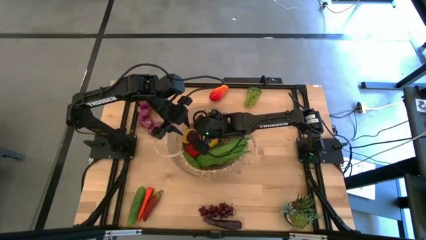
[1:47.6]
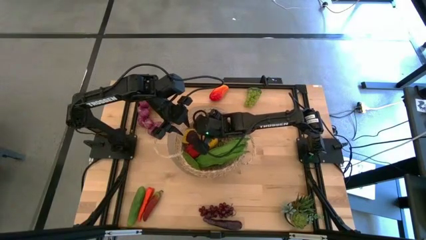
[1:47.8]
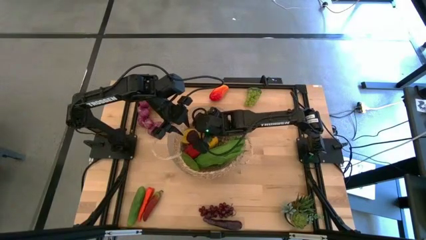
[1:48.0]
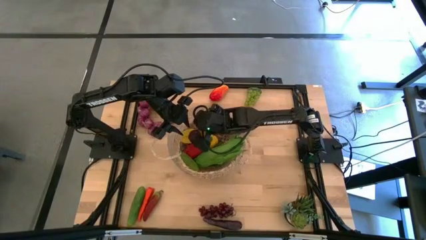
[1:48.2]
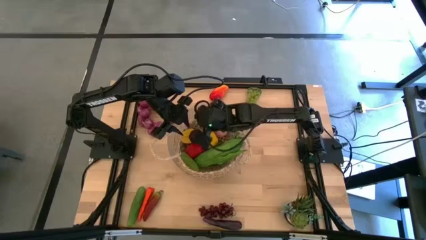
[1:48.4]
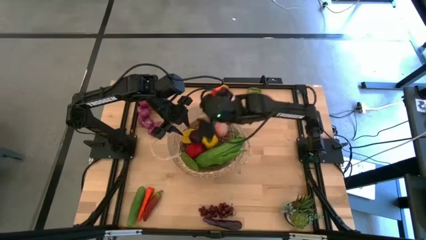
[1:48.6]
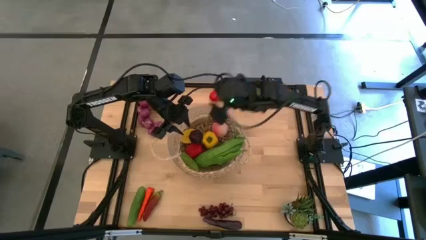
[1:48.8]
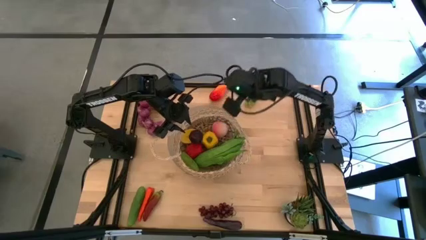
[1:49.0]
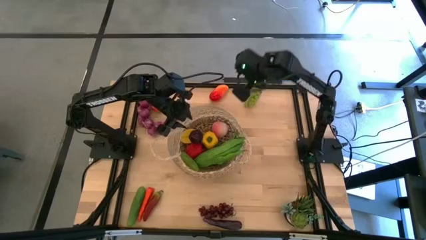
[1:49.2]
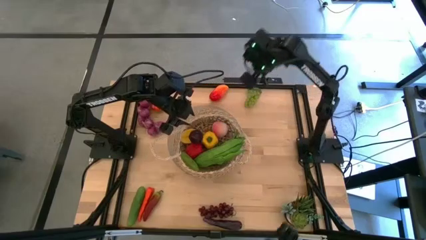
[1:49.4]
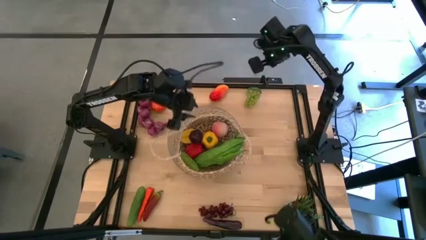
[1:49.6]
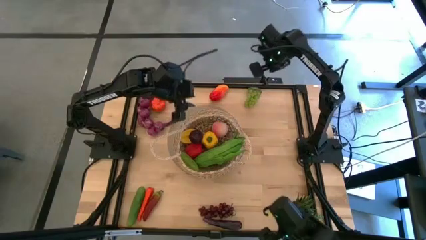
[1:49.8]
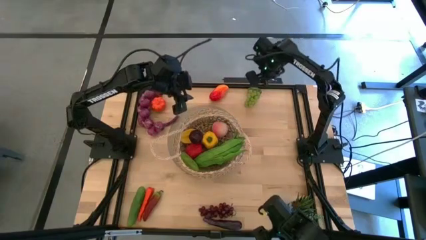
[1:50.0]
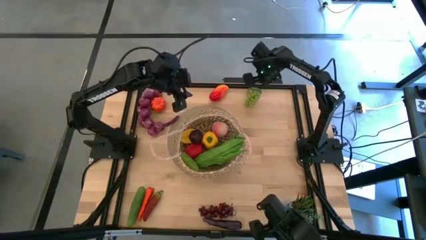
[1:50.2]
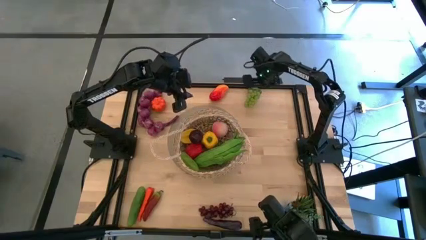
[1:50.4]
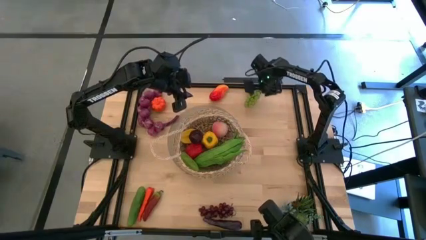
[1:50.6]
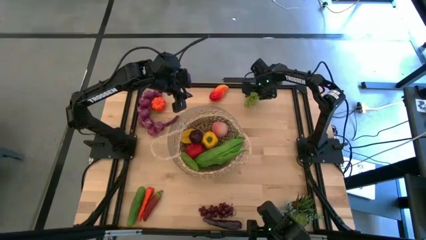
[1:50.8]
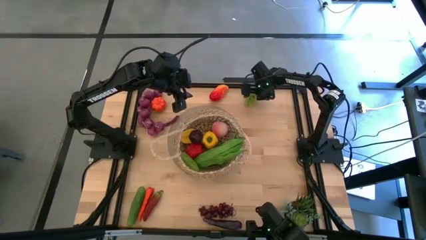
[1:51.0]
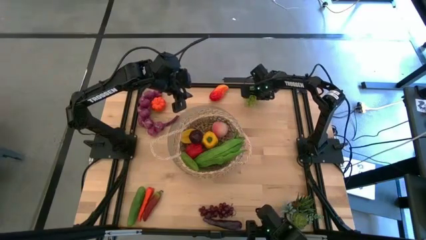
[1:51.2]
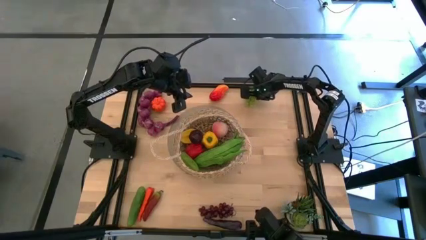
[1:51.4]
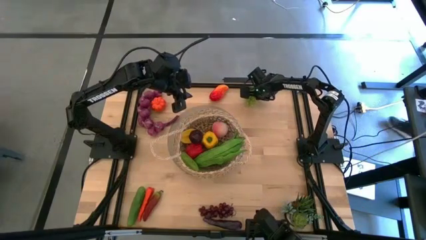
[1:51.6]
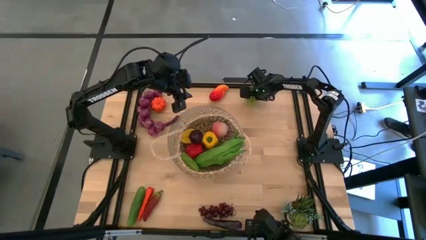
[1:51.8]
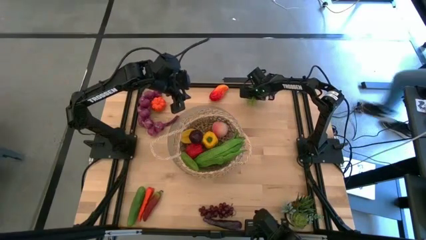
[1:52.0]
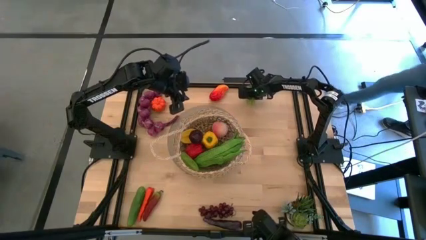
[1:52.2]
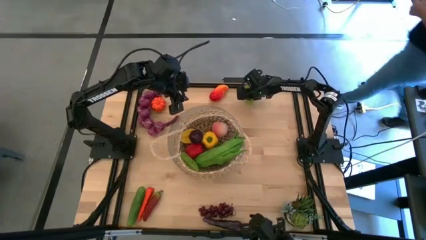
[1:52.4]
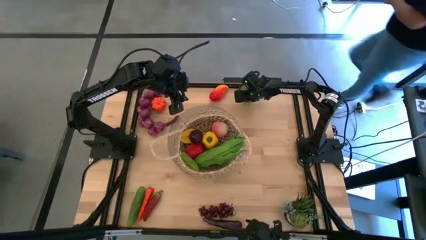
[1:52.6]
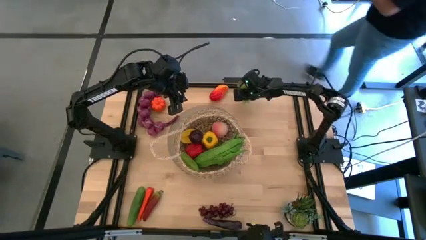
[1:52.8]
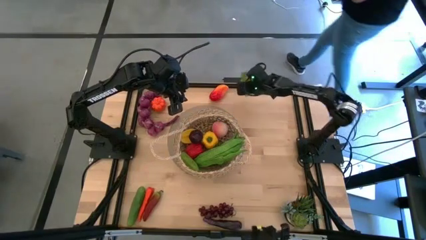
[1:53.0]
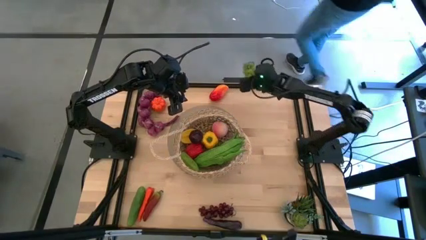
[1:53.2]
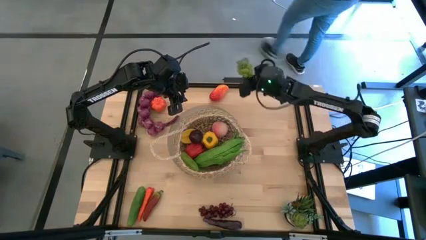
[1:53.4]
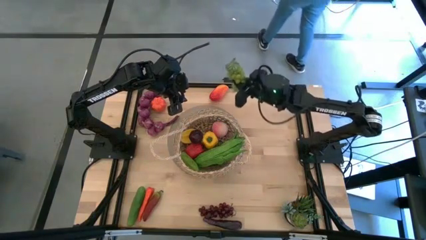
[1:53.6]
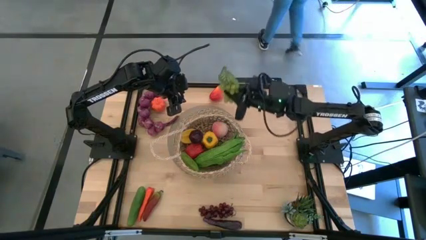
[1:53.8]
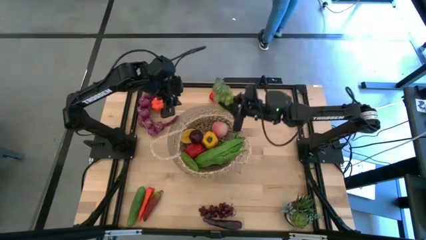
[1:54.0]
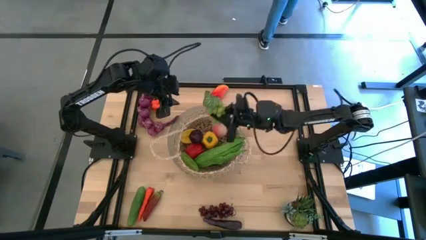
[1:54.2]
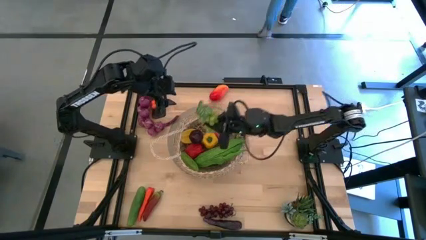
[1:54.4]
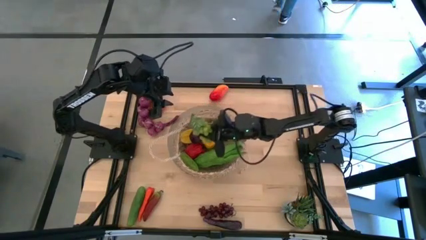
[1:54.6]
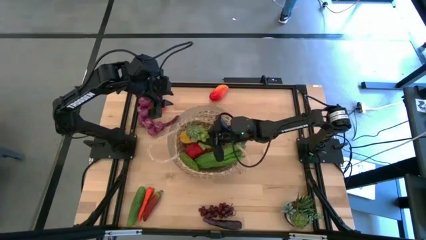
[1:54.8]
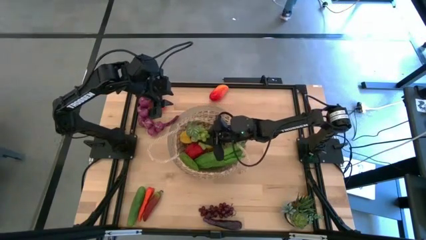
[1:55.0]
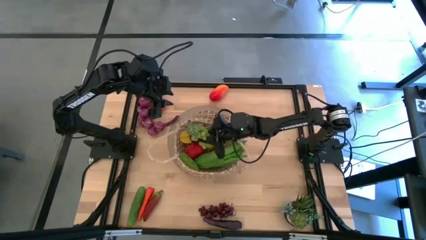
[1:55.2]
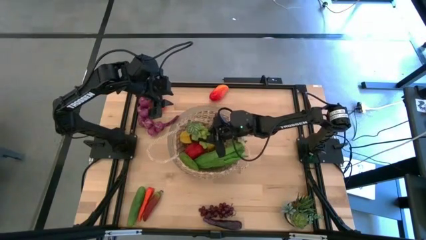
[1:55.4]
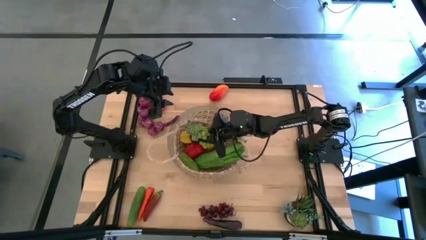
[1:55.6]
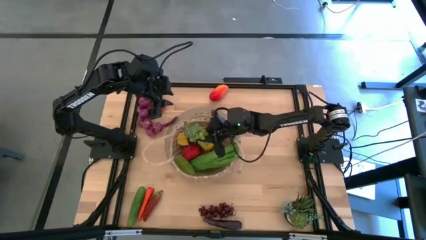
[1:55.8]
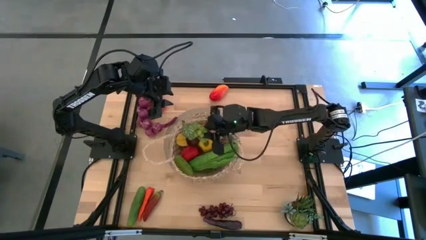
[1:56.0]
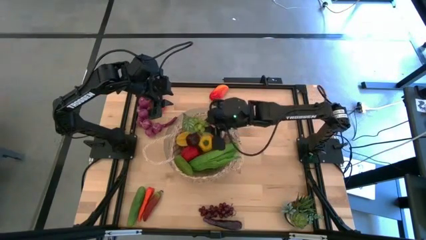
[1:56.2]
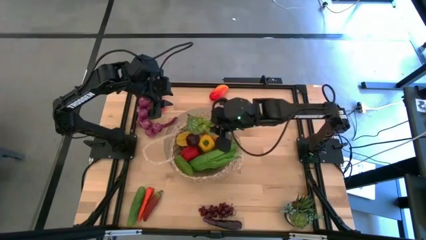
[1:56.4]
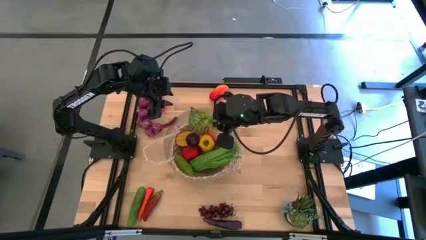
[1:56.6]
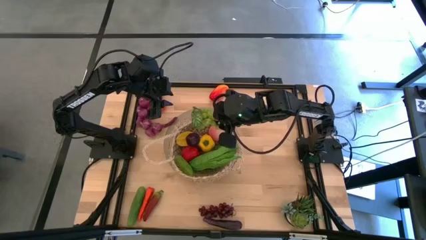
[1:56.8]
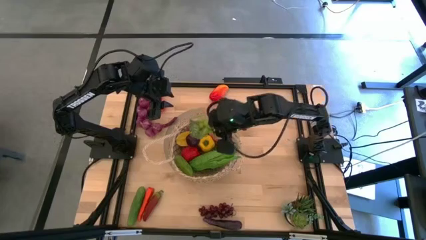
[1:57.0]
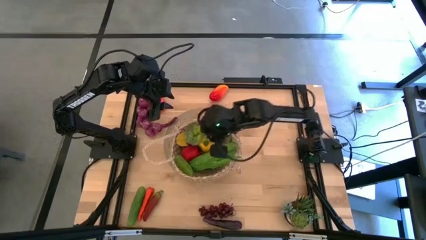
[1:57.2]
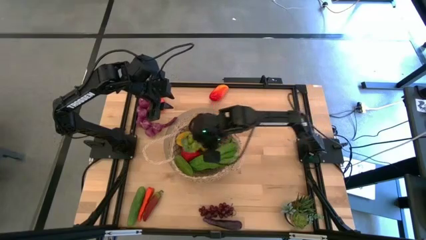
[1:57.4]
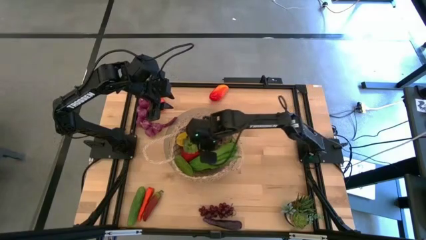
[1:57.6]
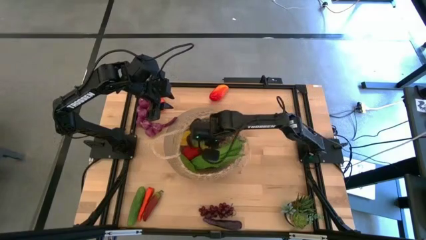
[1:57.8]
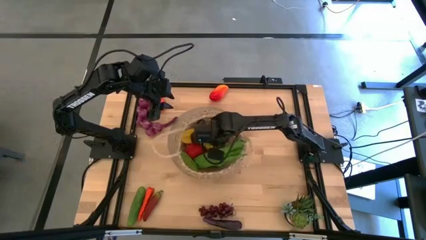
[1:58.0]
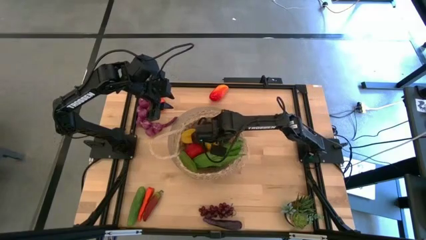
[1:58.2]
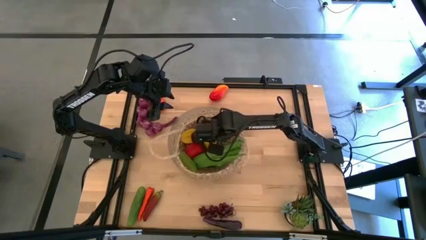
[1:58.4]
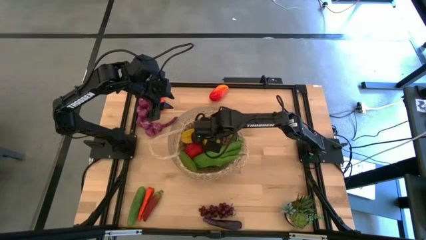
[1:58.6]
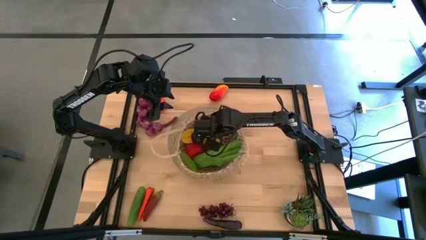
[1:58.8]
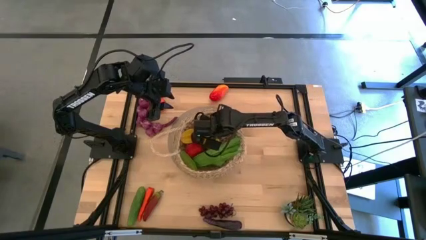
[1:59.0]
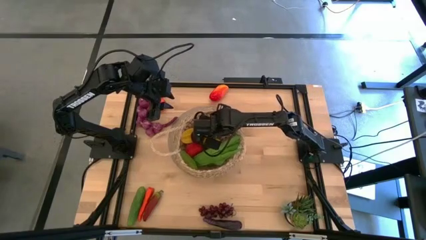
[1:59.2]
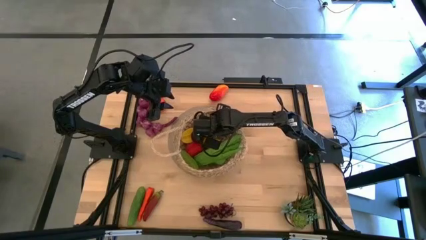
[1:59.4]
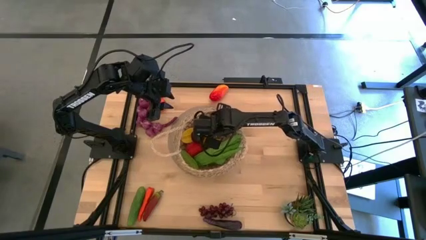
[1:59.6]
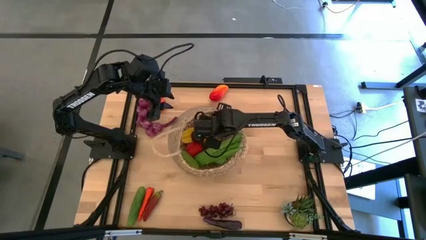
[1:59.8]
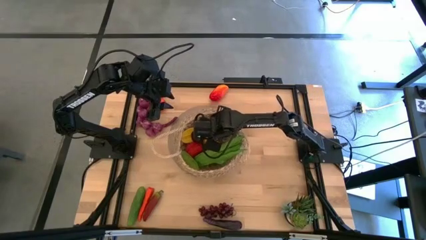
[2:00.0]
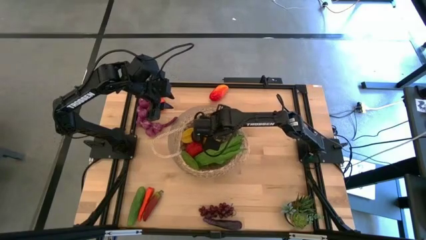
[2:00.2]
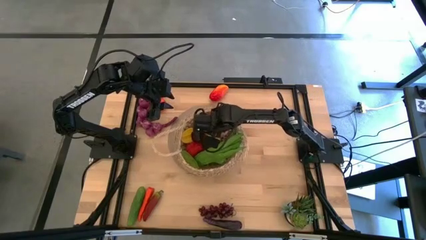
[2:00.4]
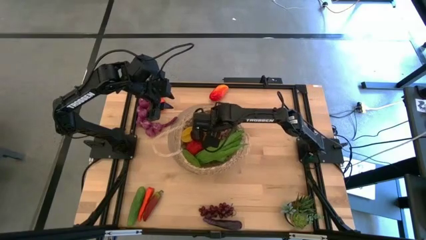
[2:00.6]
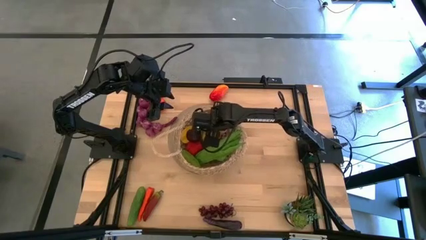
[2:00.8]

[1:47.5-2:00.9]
Task: Build produce basket
Put the green grapes into the brown basket
